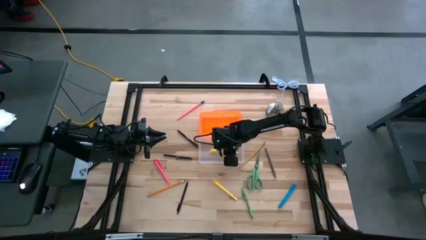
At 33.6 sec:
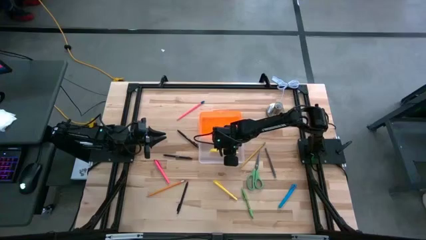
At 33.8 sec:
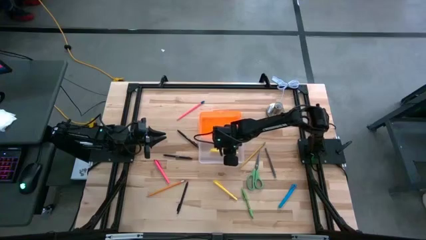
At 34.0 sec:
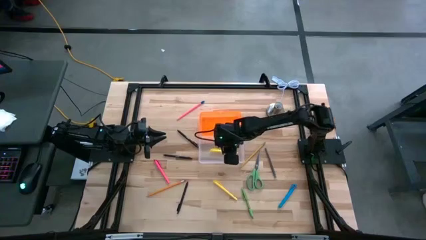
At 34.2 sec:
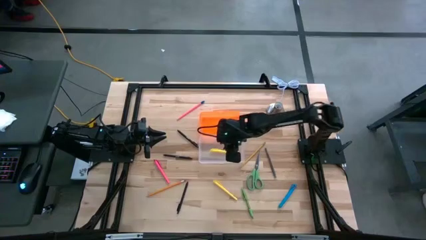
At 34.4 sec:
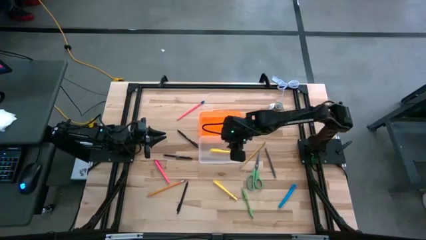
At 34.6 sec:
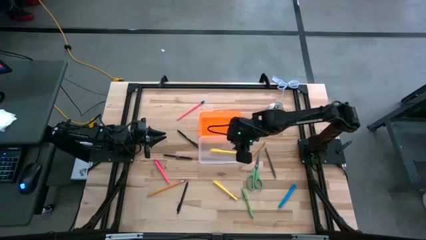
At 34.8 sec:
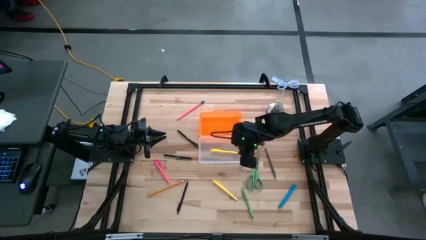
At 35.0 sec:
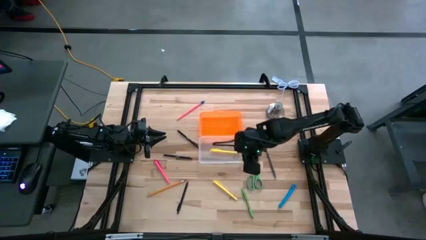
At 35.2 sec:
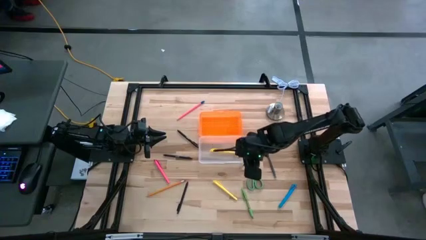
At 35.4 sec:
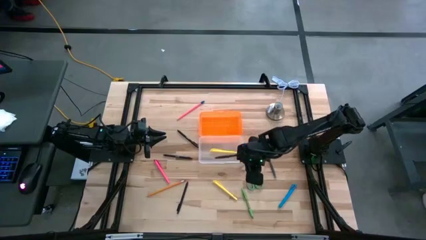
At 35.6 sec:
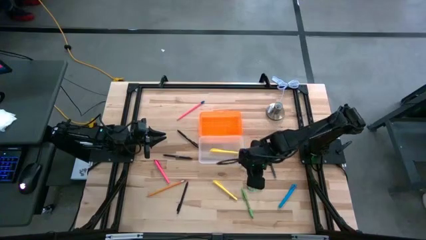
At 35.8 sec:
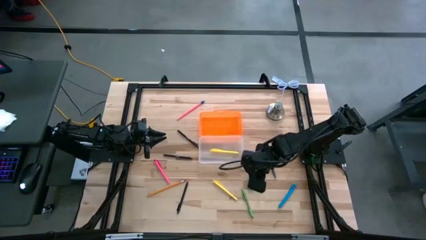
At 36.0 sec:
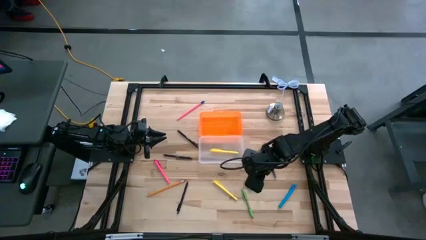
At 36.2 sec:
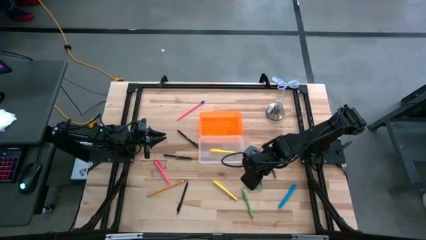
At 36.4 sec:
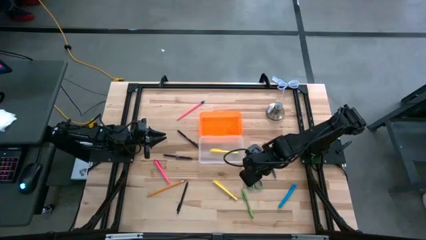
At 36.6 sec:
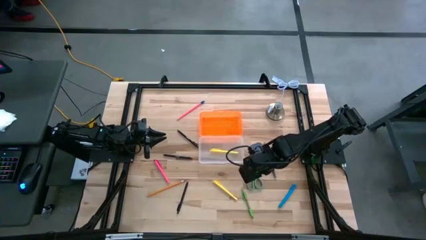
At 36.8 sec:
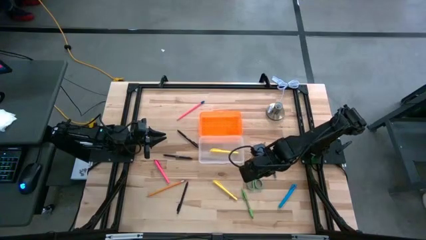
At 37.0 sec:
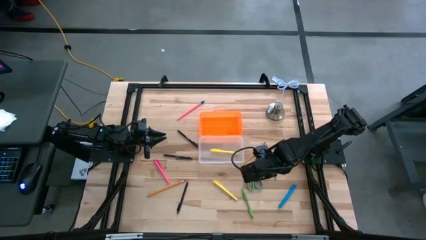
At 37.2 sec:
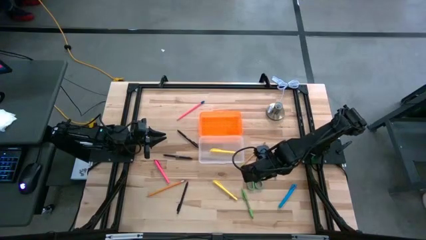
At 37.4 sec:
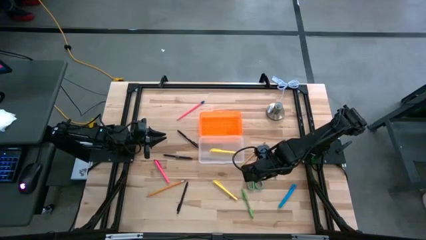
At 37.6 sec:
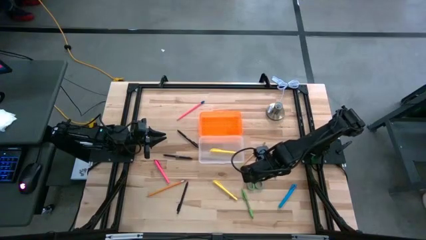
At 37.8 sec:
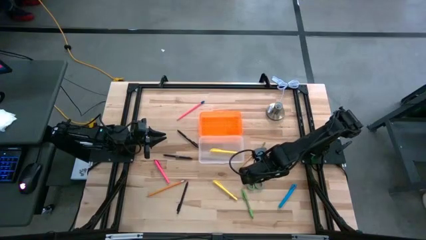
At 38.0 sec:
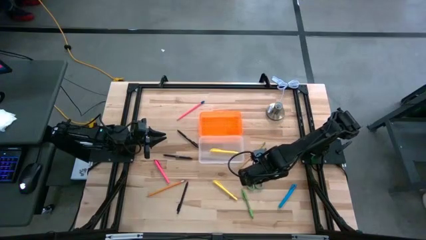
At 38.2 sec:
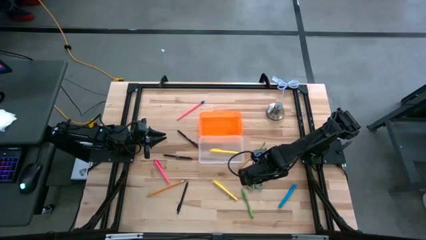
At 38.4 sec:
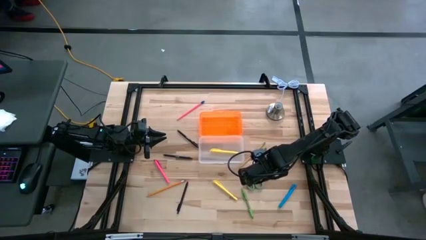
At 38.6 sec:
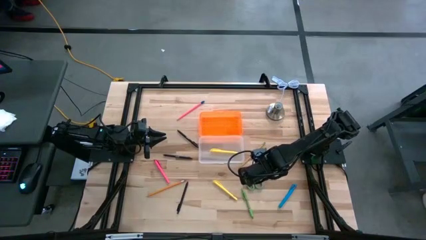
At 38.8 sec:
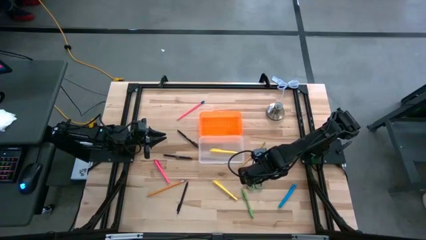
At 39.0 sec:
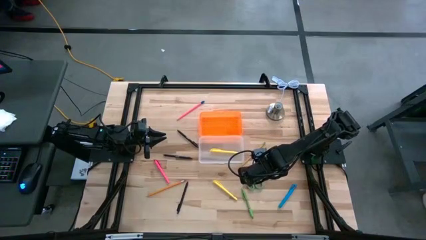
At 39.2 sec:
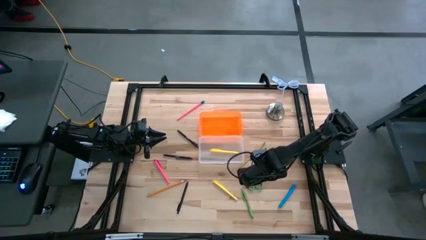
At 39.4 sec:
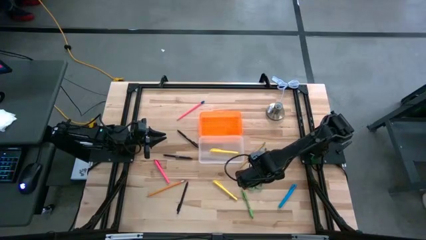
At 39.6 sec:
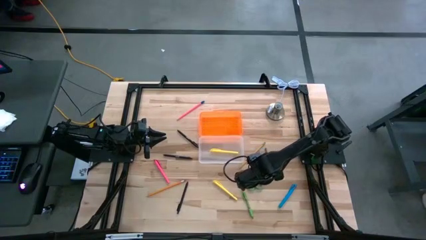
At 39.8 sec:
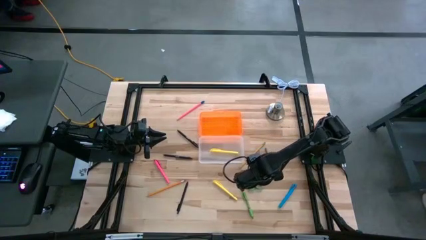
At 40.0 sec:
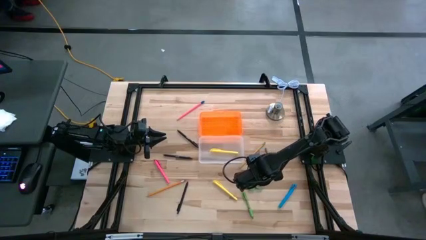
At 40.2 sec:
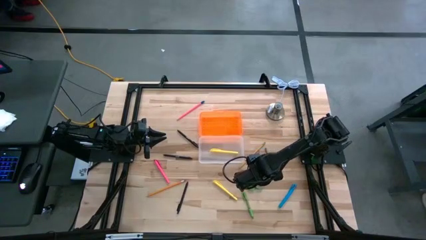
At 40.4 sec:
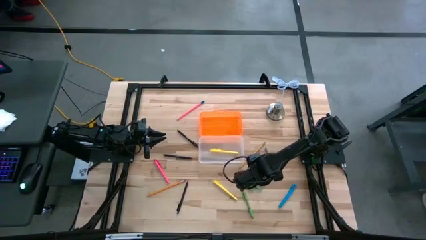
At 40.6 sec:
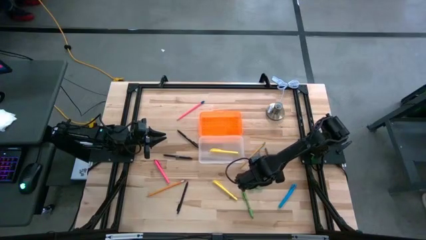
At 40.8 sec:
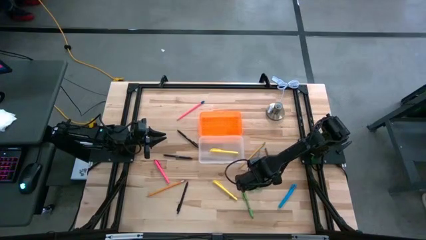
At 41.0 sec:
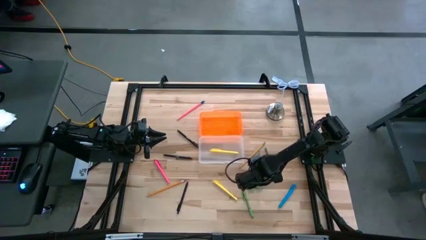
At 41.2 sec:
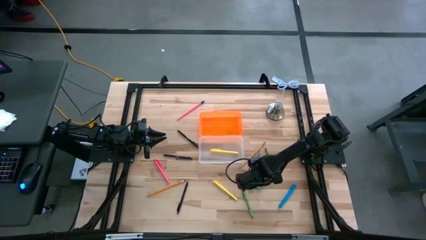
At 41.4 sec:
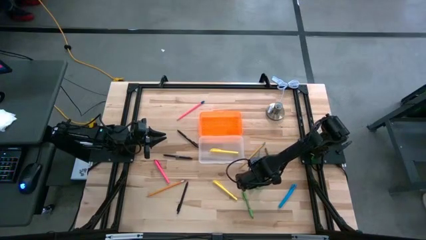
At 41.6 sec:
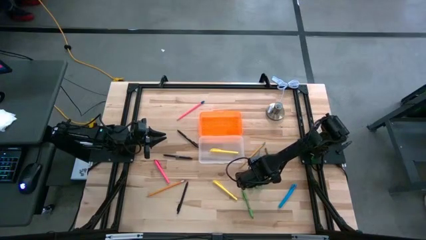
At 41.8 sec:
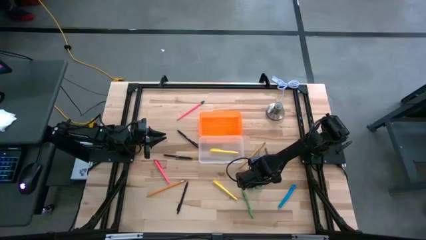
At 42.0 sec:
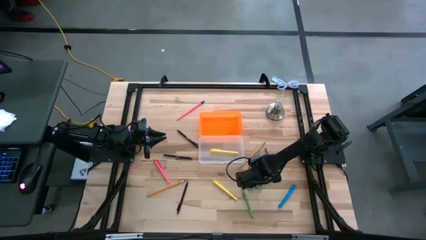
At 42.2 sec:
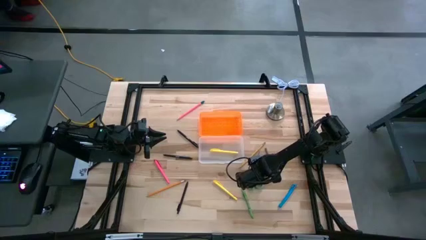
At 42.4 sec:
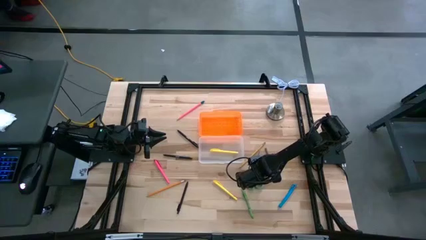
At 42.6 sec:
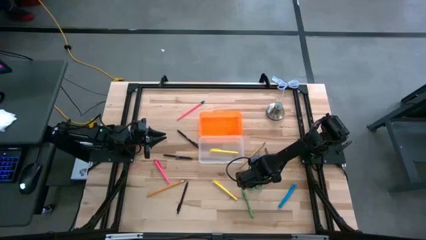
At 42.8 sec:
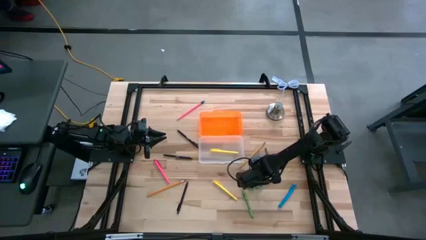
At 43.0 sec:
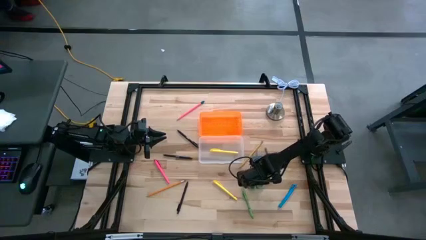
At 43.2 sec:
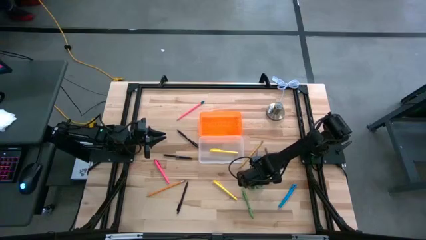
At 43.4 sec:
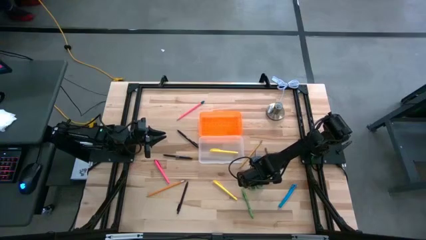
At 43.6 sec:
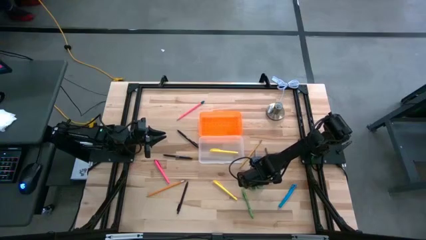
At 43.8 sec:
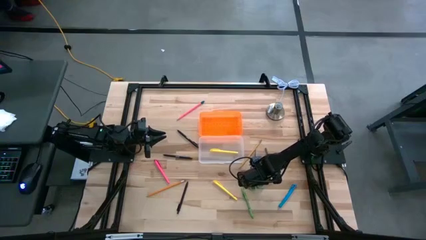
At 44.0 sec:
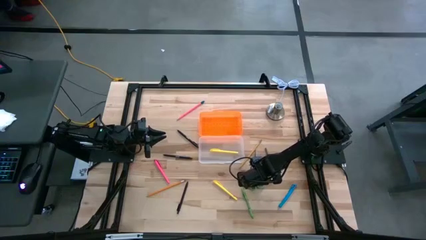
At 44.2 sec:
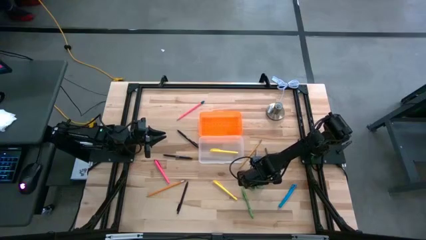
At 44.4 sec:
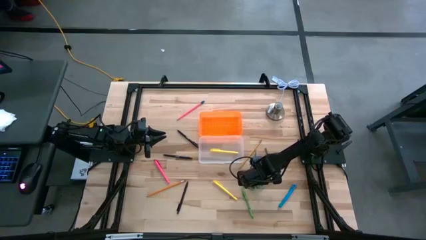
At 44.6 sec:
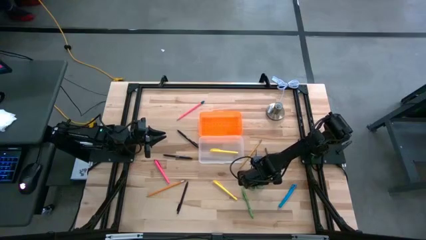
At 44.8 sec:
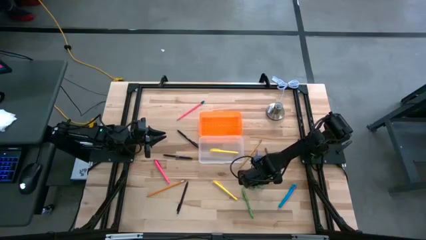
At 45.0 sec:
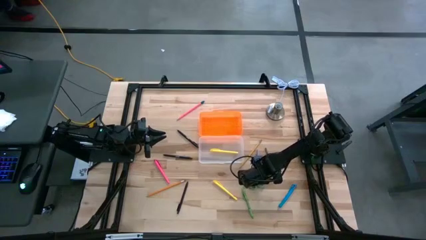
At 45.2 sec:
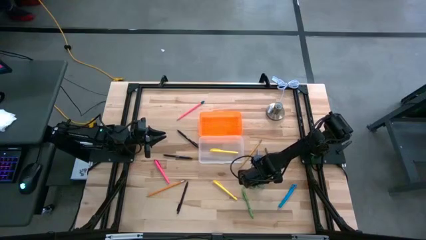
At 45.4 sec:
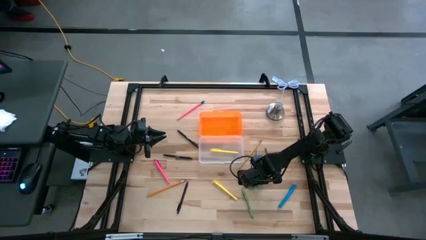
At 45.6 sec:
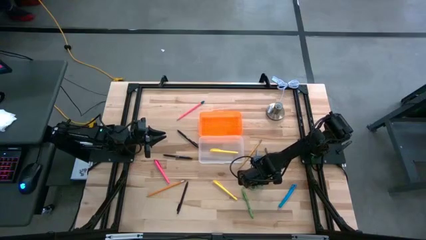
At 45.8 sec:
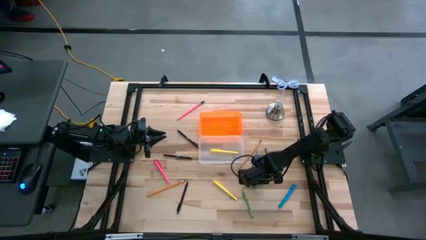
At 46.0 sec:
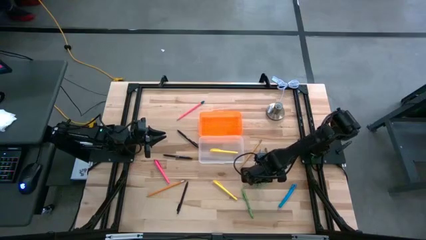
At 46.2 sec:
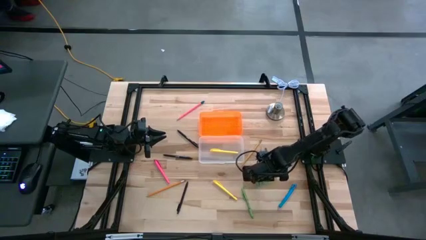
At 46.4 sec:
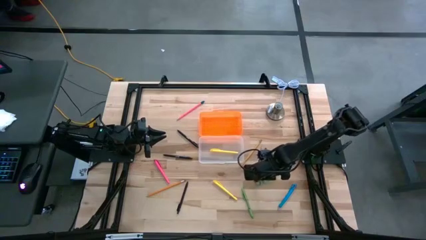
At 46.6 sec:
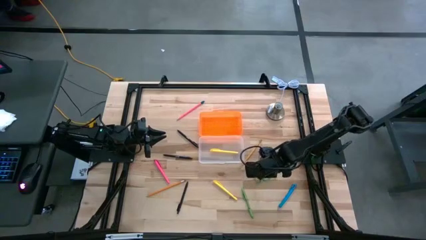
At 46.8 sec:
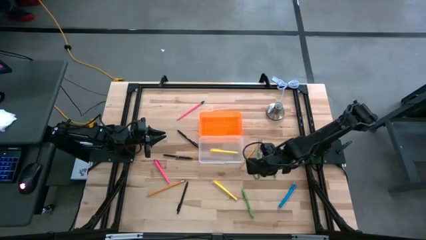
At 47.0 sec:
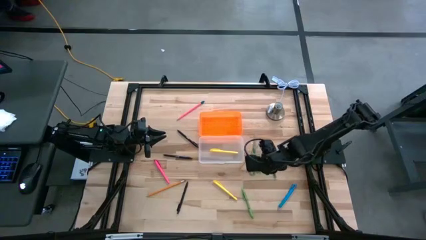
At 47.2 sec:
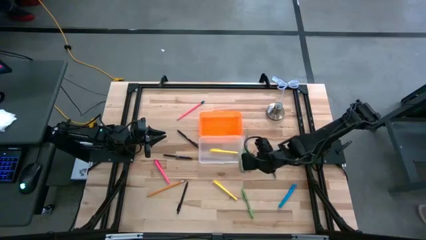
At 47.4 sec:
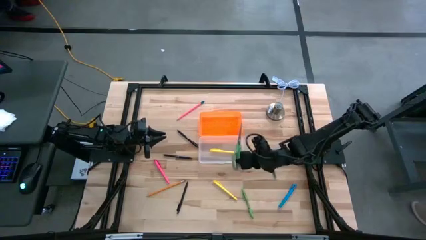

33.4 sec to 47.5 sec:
Task: Pick & place school supplies into a supply box
Put the green scissor into the container
